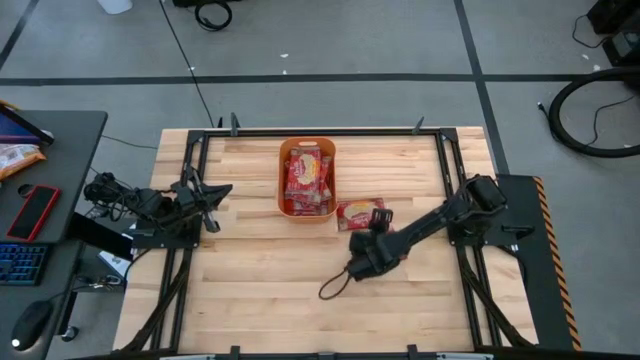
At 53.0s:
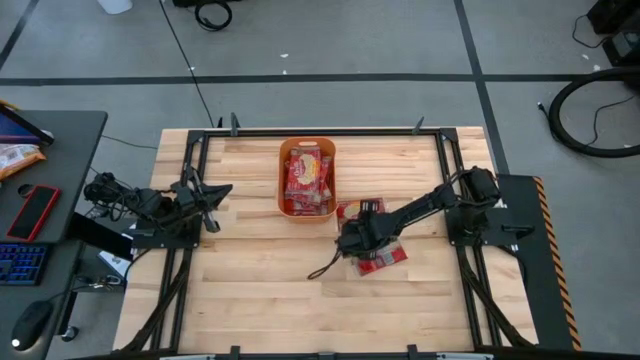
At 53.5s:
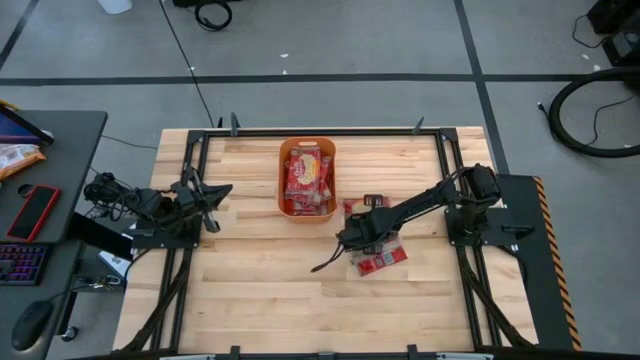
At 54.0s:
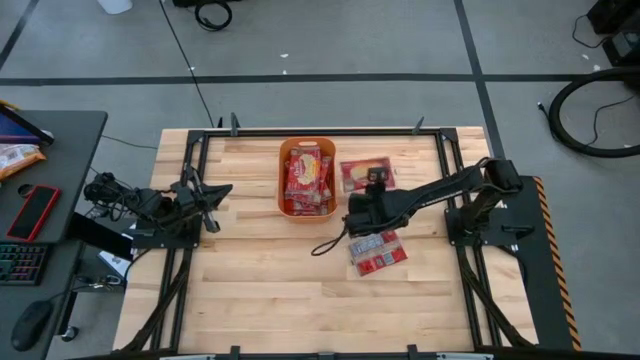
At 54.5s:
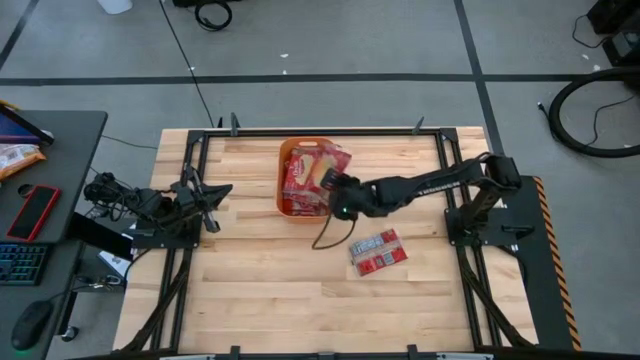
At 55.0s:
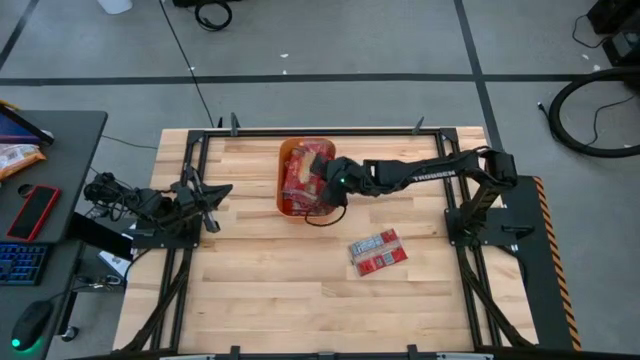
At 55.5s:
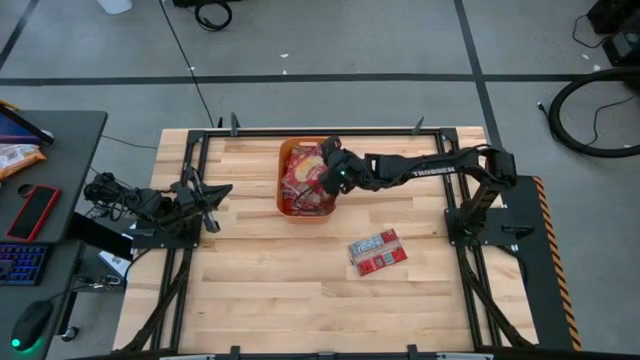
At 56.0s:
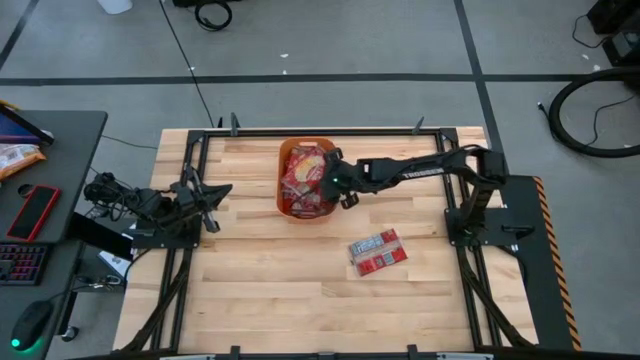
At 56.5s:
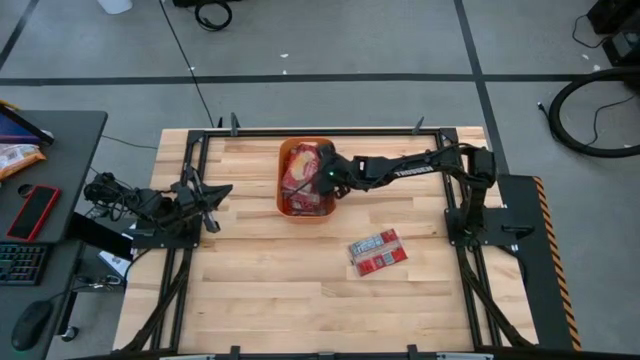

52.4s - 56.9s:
Task: Sort popcorn bags into baskets
Put the top popcorn bag into the orange bin

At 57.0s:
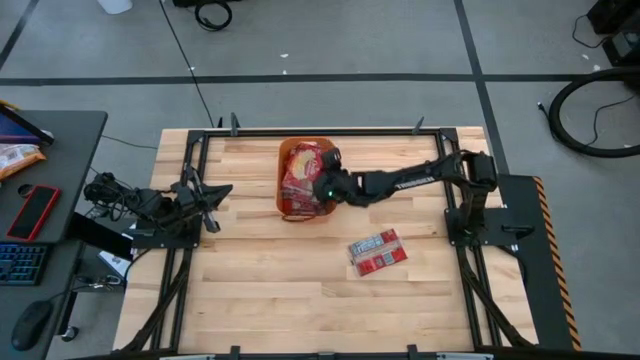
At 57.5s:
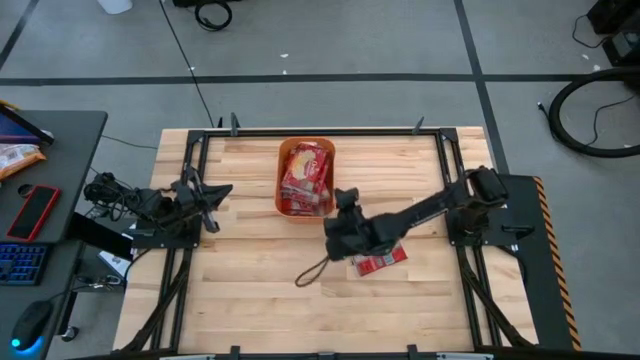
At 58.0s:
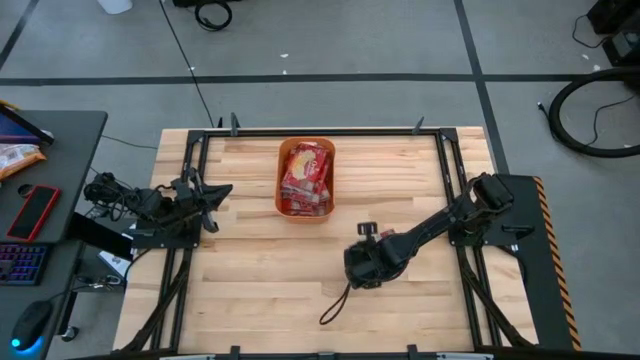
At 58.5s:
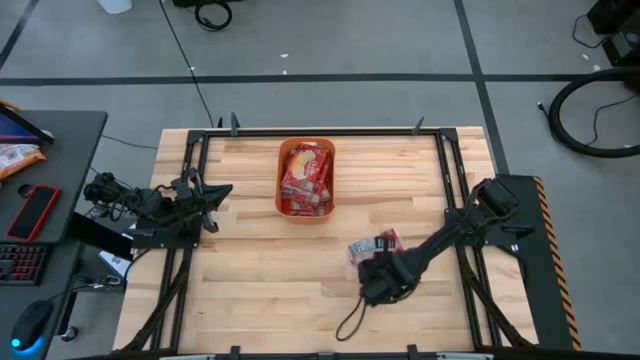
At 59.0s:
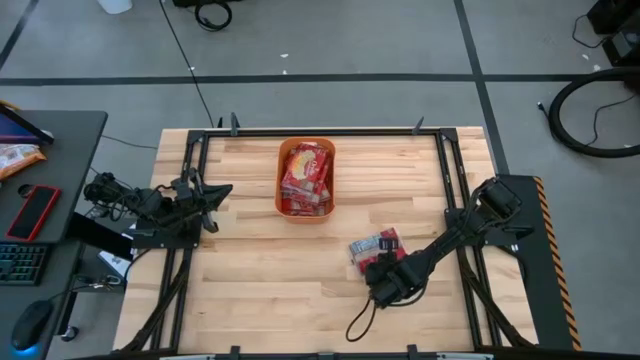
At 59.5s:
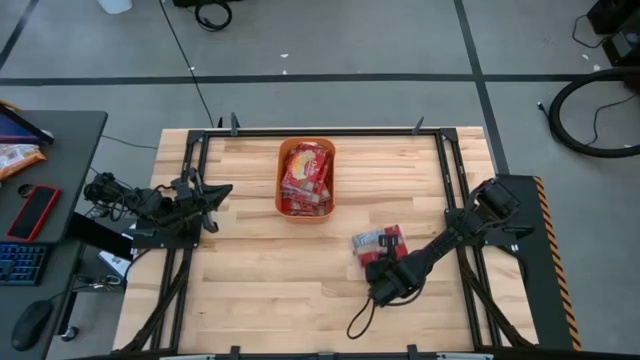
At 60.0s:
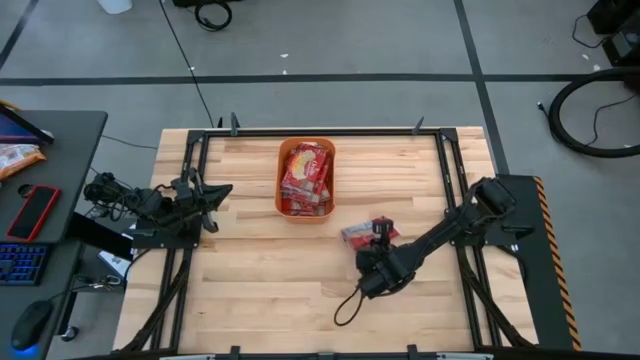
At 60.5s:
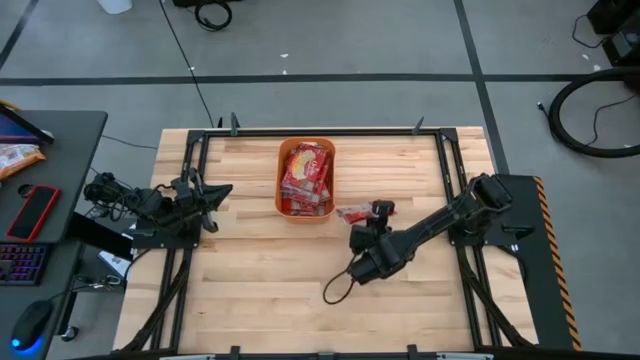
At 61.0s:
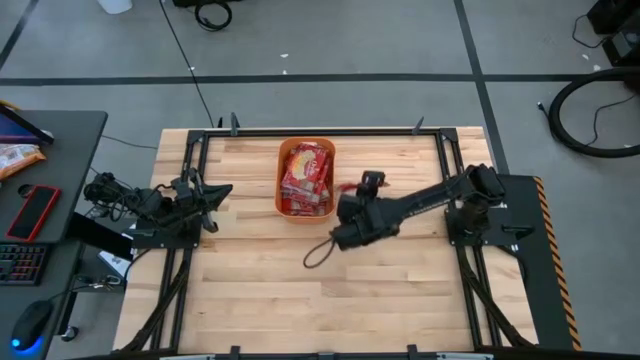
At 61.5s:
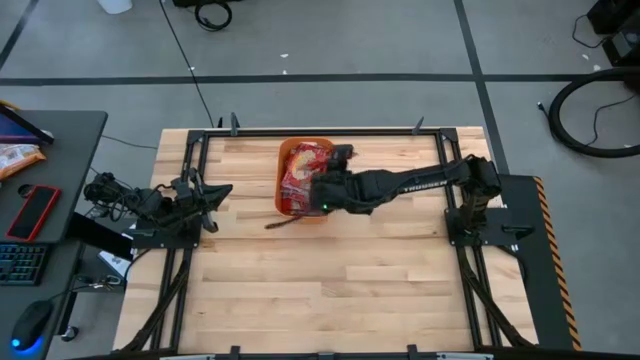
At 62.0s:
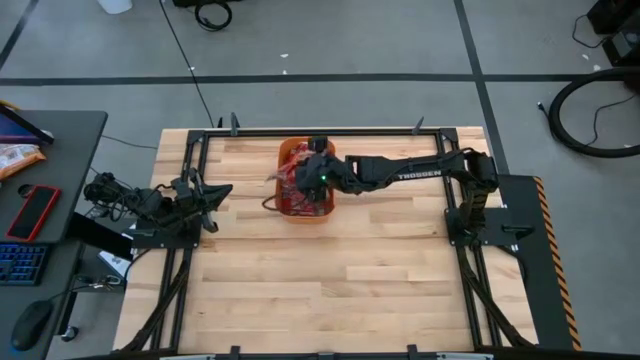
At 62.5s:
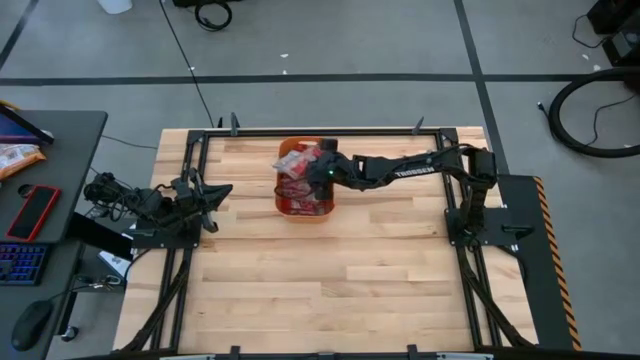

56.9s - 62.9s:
Put the popcorn bag into the orange bin

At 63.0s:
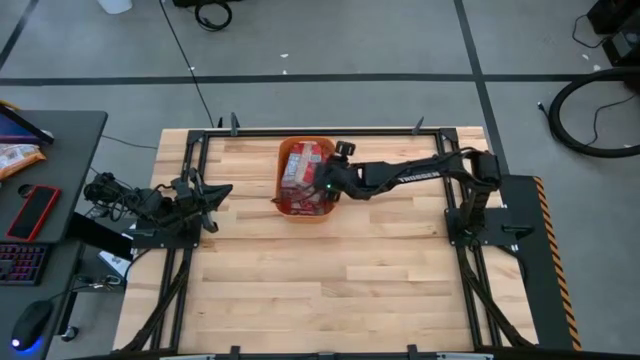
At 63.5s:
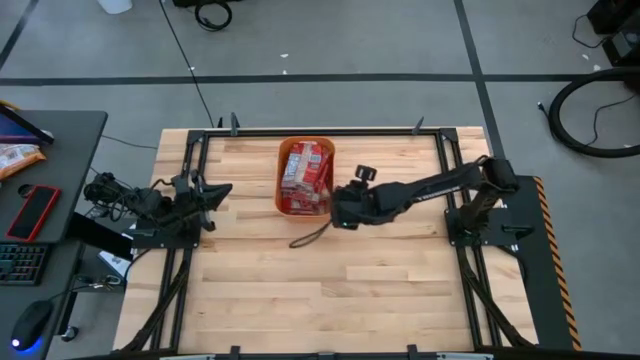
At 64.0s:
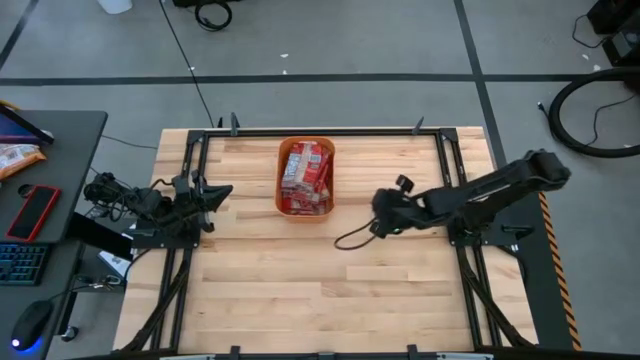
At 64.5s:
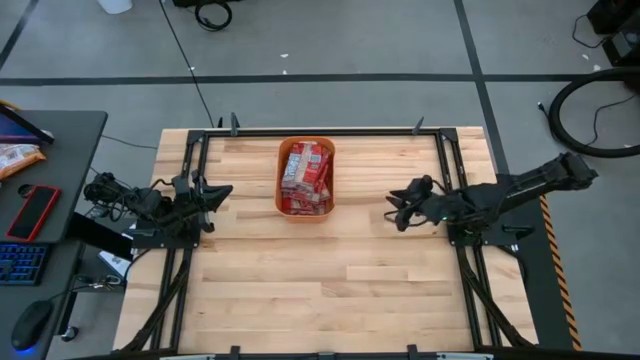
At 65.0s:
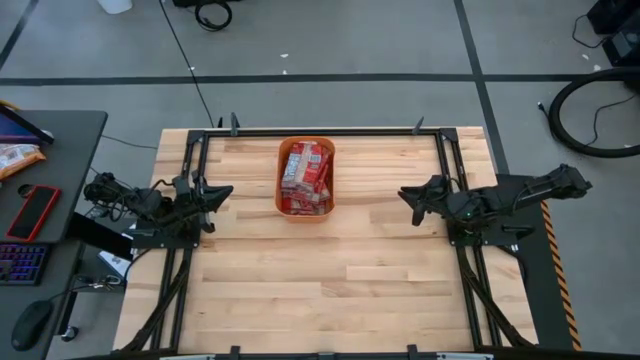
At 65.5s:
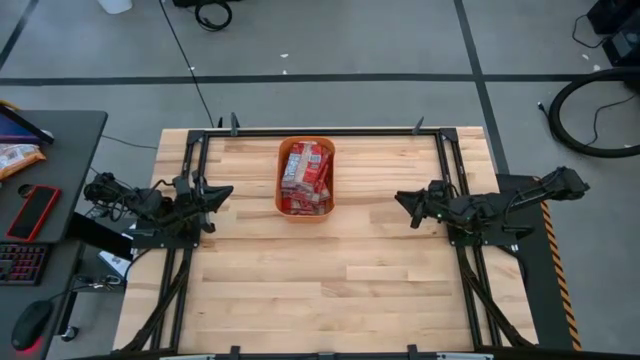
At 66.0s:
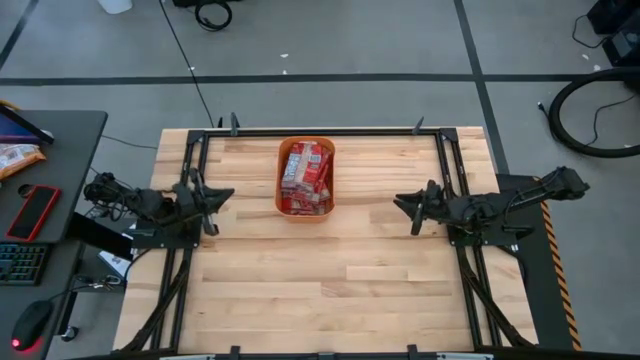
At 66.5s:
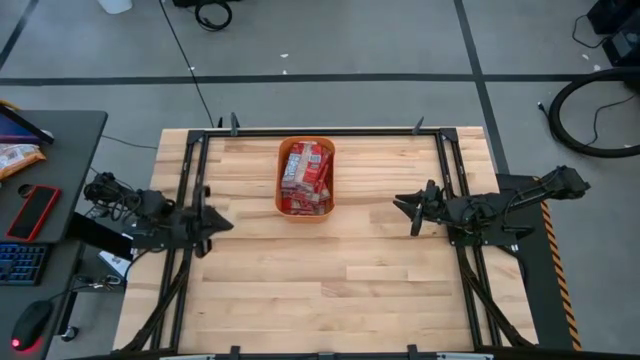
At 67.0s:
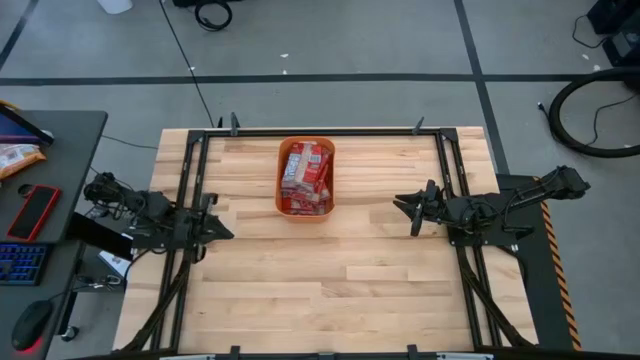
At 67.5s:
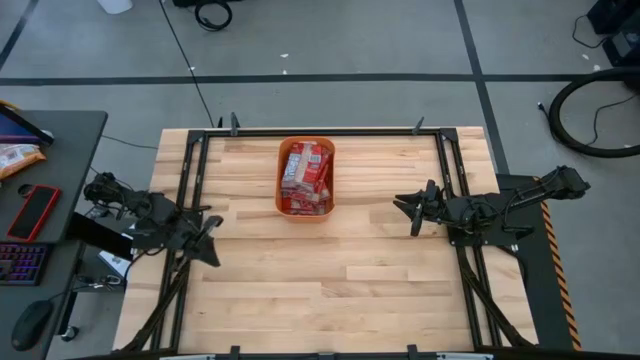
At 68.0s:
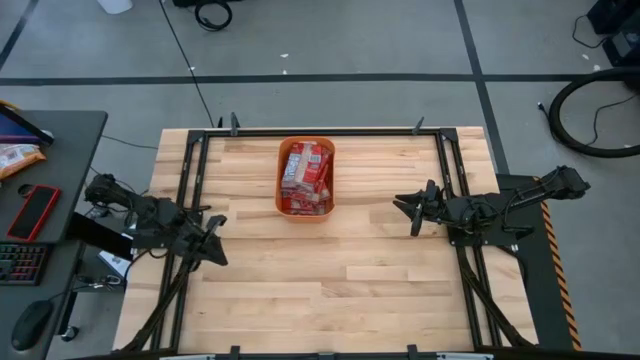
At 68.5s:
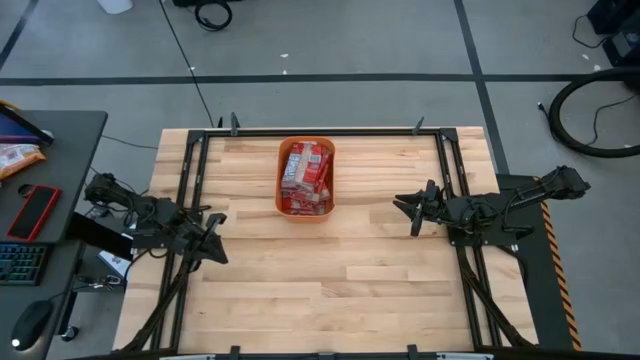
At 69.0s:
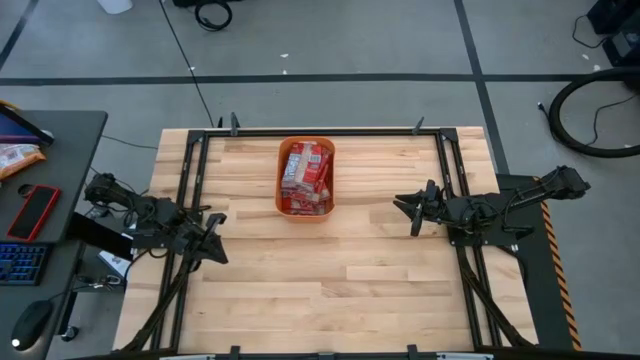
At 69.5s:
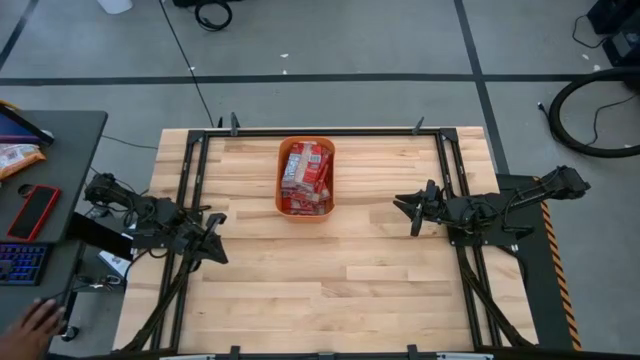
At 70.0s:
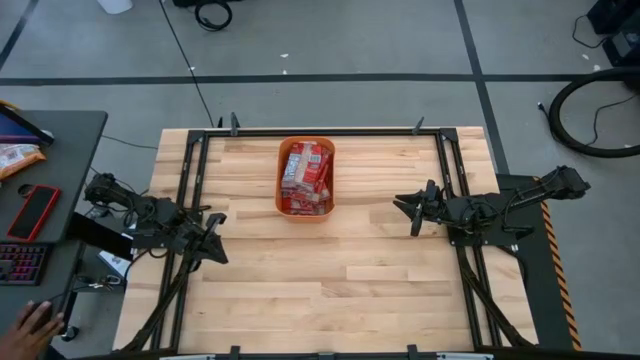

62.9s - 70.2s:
Return to Home Position

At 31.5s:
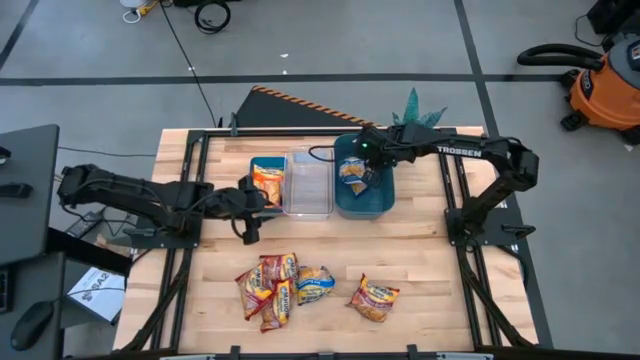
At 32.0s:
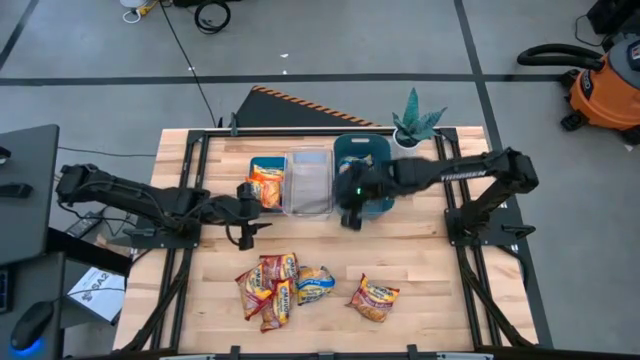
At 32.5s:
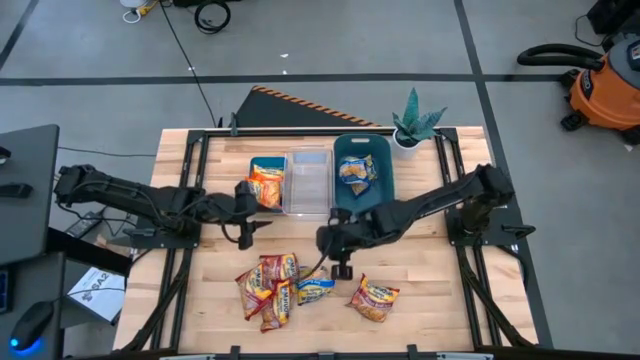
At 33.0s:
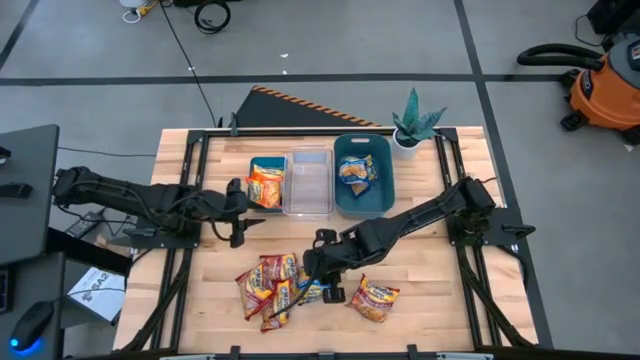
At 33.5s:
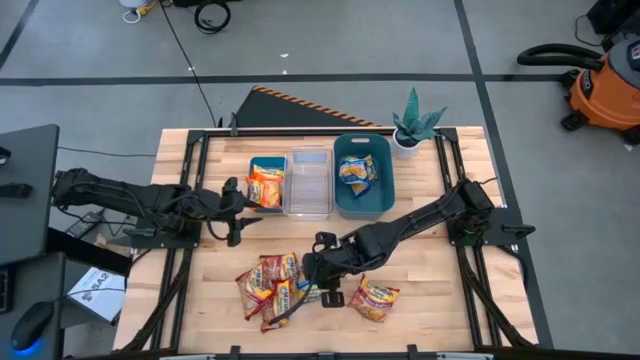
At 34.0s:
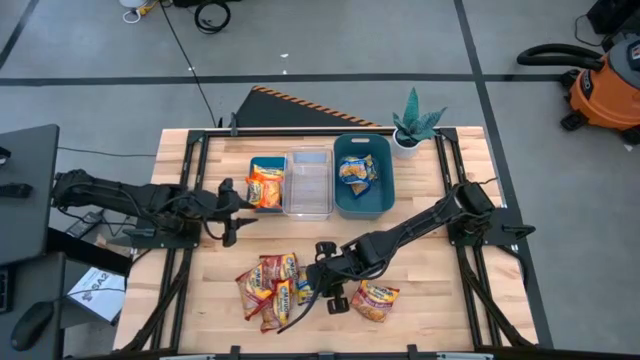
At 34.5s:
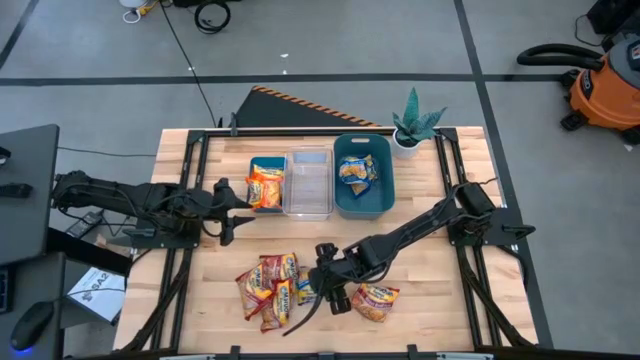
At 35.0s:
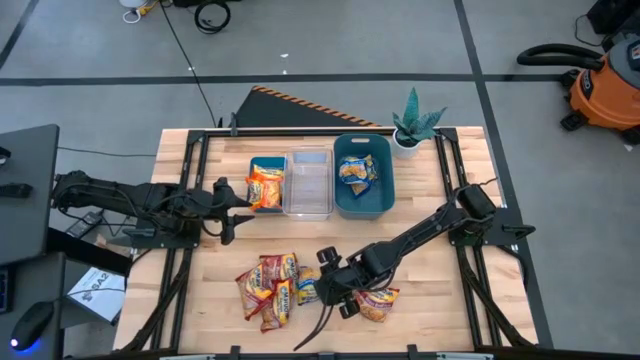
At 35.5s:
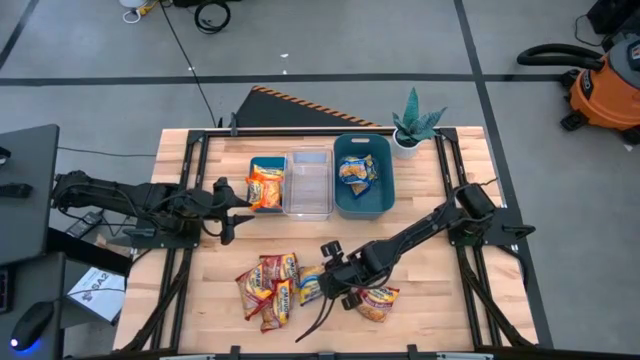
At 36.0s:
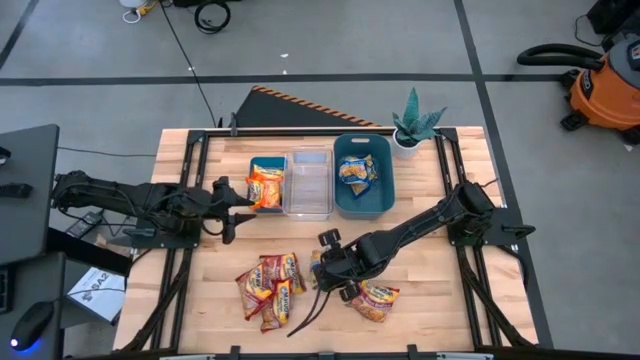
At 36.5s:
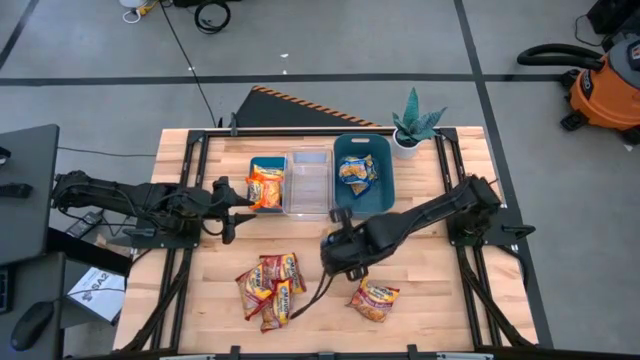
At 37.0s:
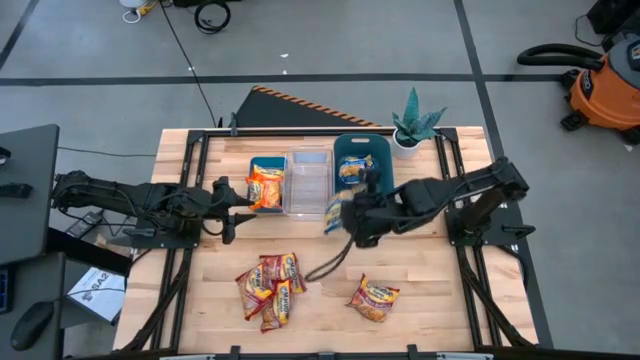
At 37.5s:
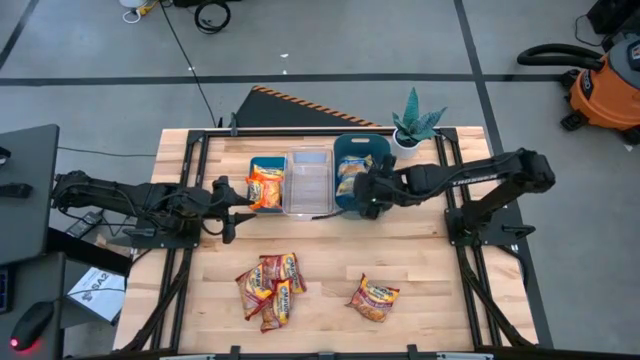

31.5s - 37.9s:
Task: Sort Maruchan noodles
Put the blue noodle pack into the dark blue bin
